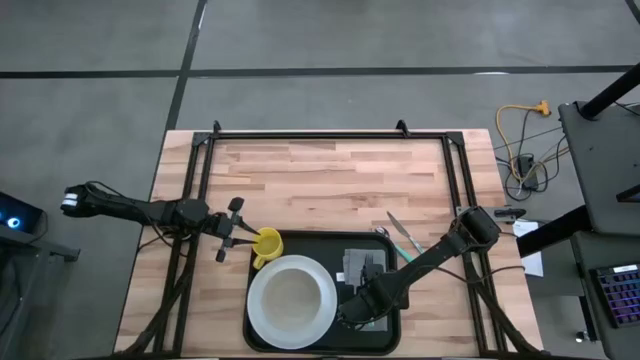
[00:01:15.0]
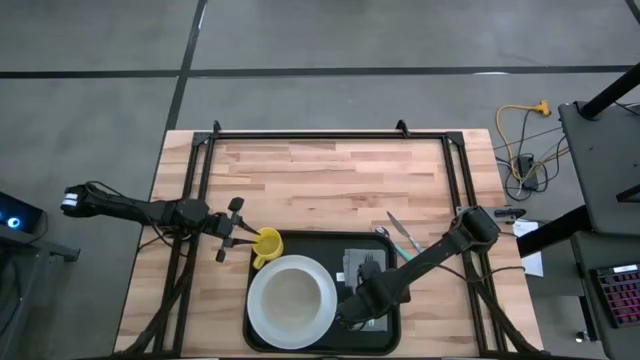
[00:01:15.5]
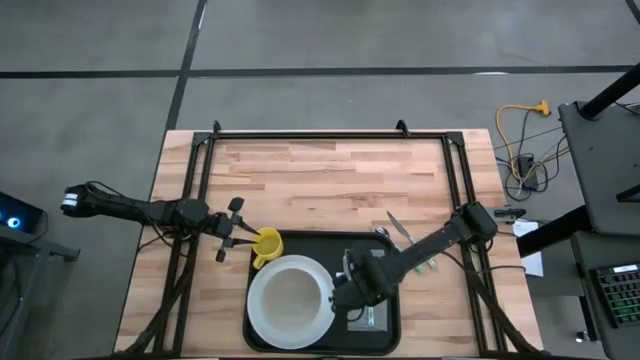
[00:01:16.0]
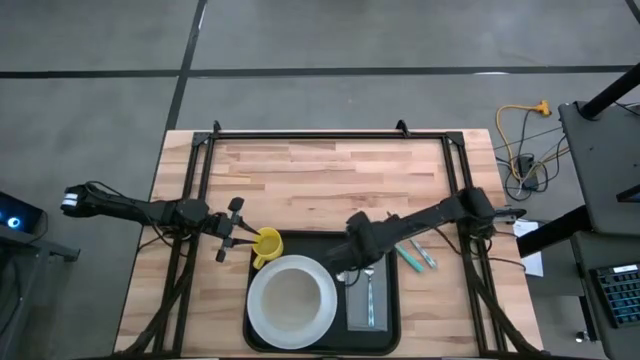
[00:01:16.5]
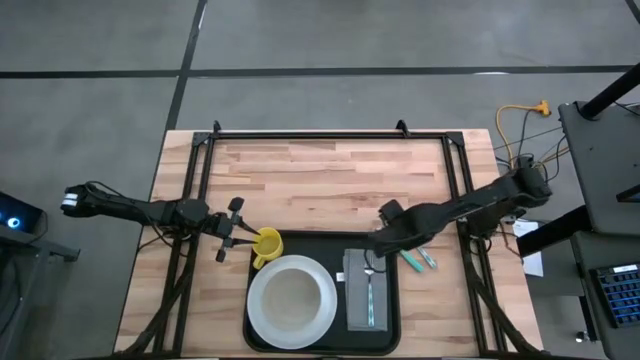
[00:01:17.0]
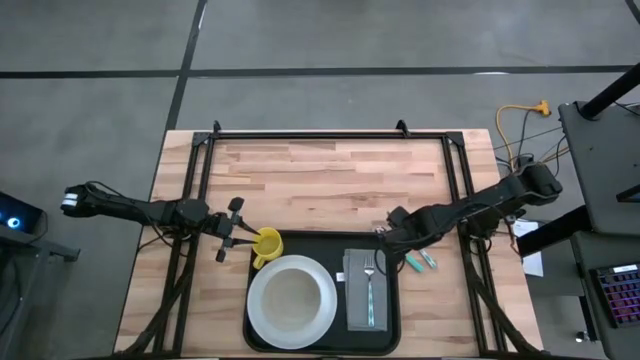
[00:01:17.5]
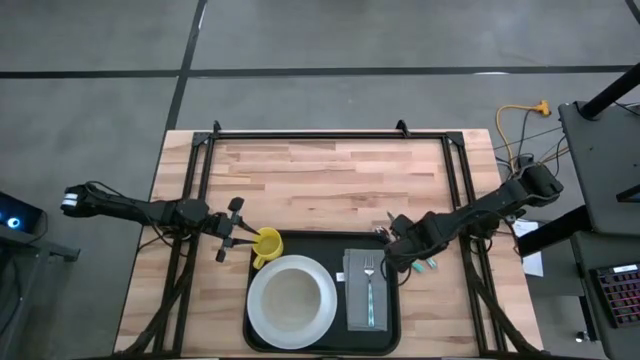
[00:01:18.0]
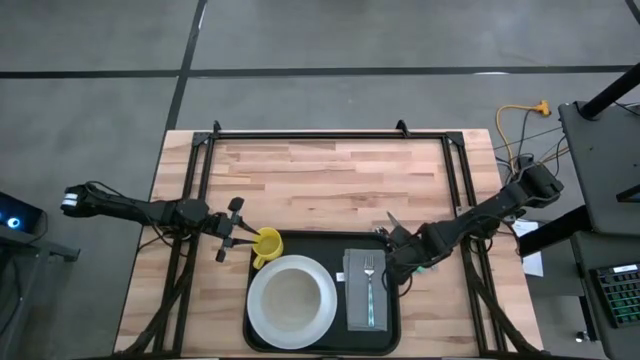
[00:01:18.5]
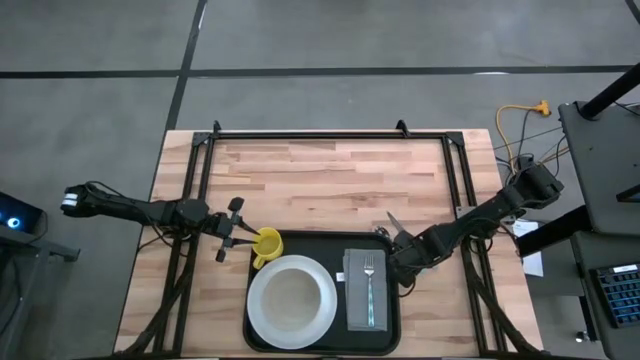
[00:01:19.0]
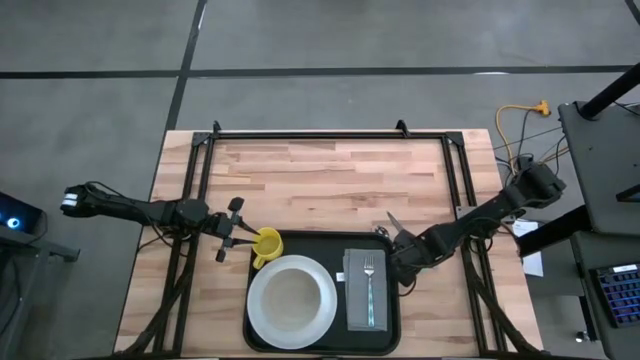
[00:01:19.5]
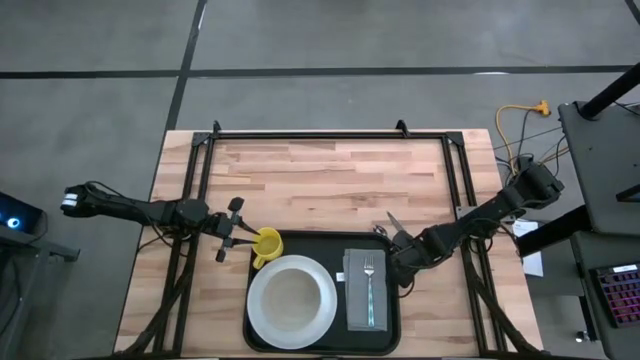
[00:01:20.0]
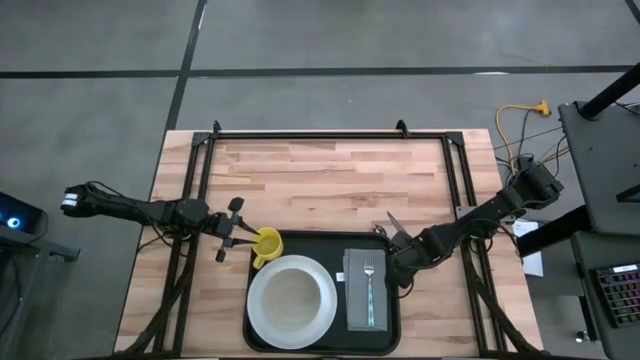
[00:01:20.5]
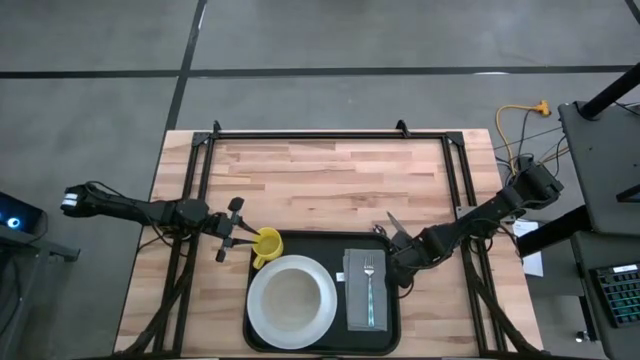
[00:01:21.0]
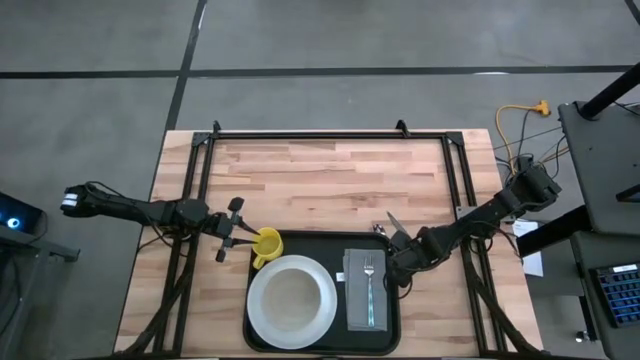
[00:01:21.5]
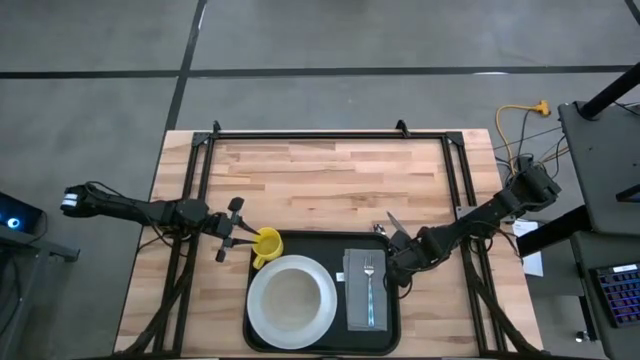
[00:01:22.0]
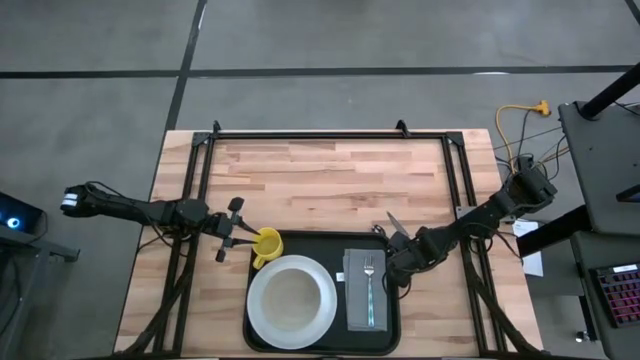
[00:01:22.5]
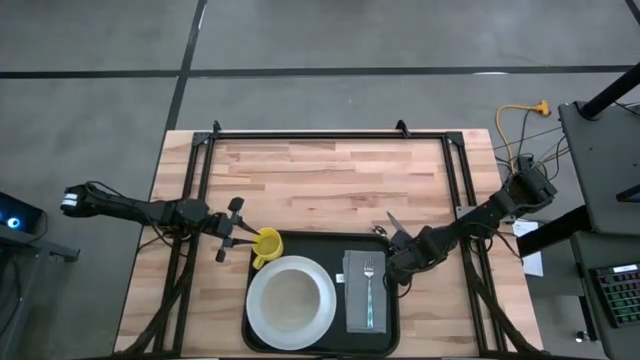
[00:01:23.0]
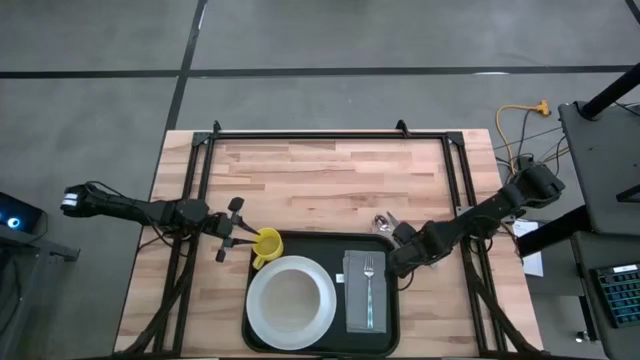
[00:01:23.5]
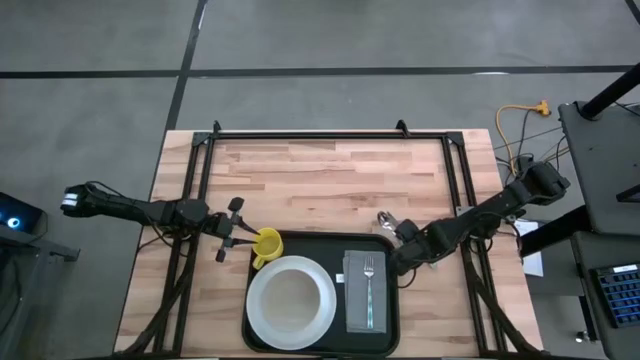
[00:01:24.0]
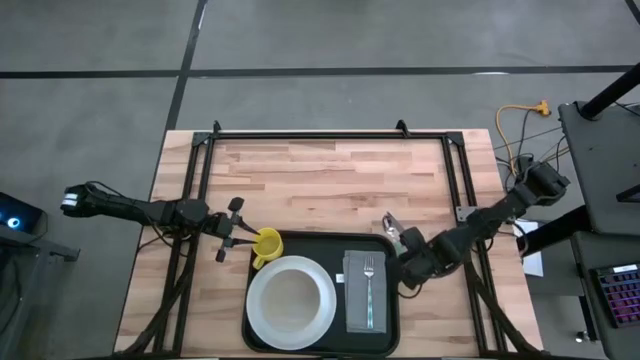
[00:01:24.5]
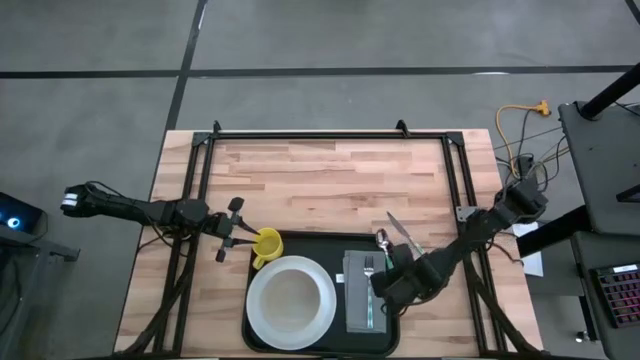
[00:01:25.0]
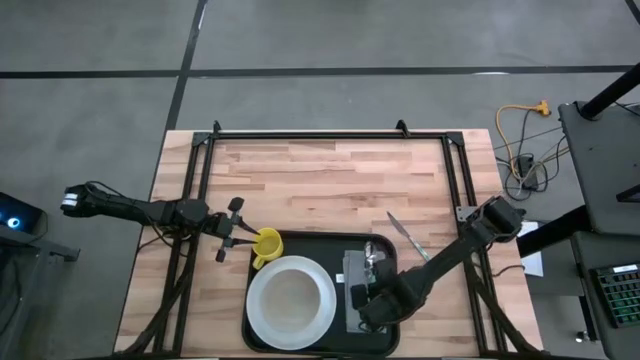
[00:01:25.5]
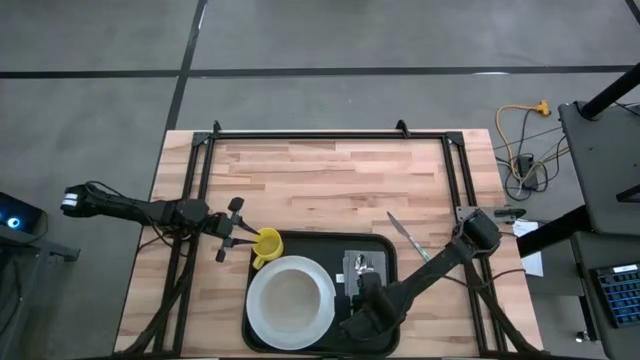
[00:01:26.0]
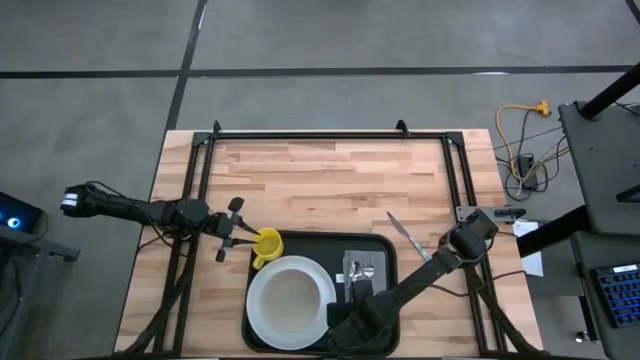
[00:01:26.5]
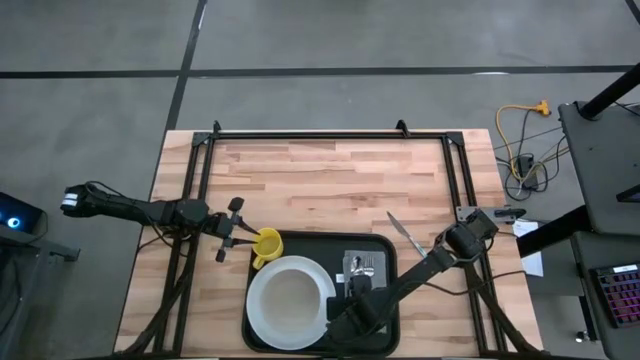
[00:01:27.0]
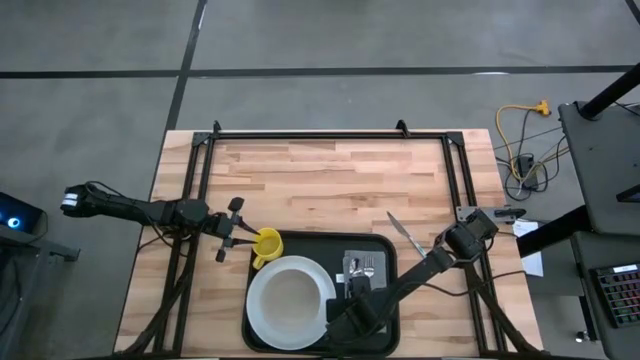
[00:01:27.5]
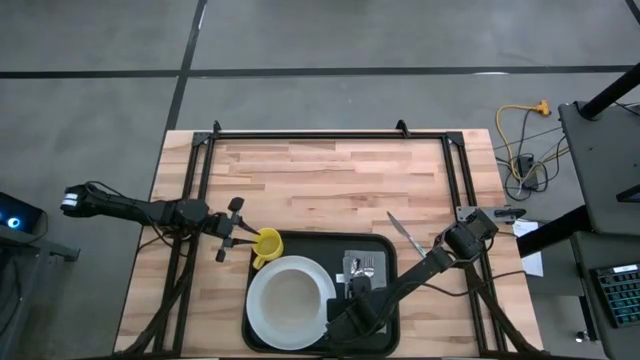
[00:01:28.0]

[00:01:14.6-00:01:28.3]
Task: Set up tray
Put the blue spoon on the gray napkin to the right of the white plate

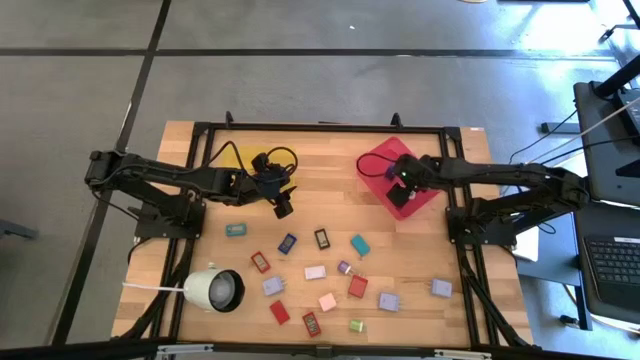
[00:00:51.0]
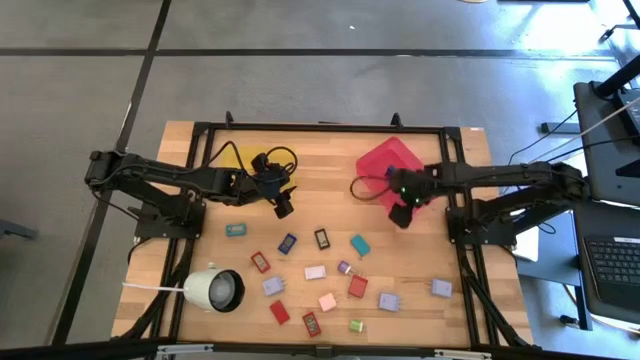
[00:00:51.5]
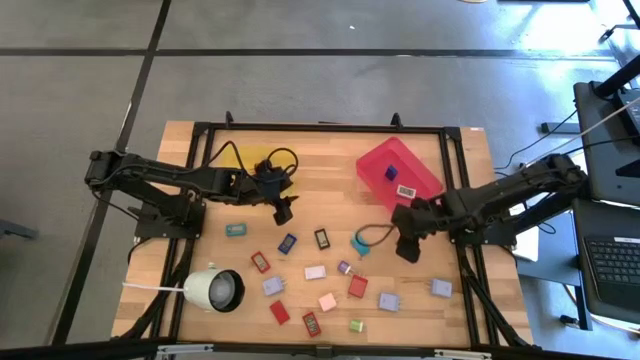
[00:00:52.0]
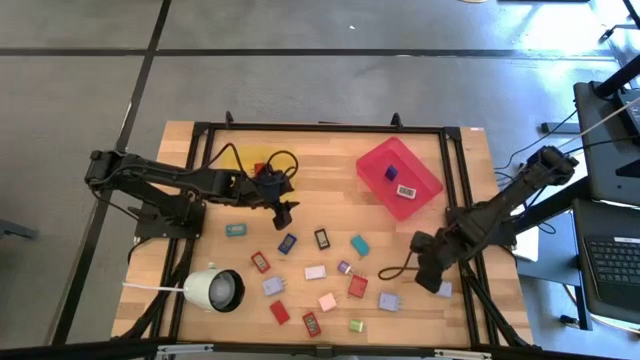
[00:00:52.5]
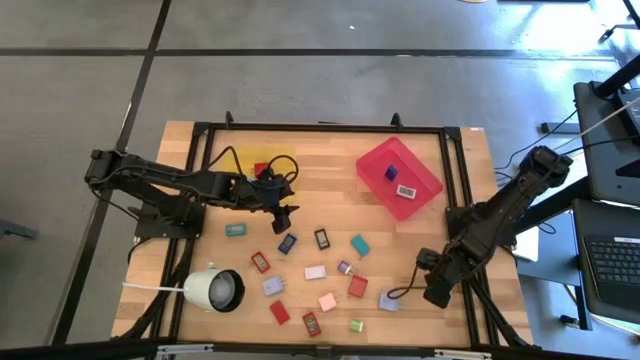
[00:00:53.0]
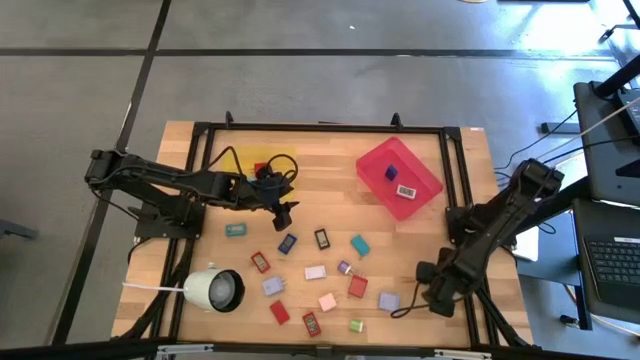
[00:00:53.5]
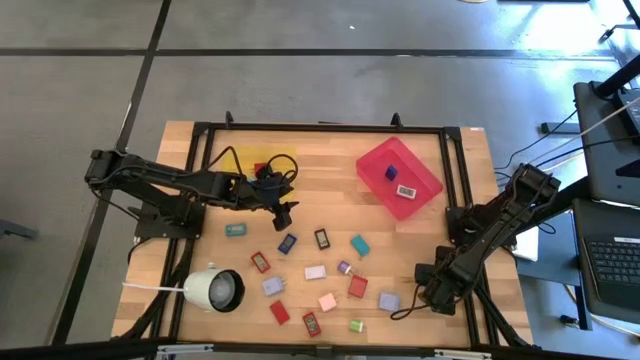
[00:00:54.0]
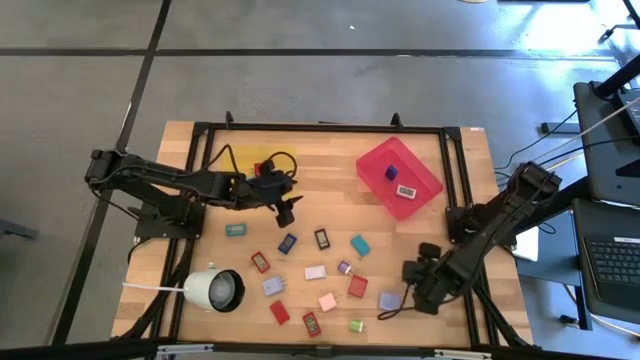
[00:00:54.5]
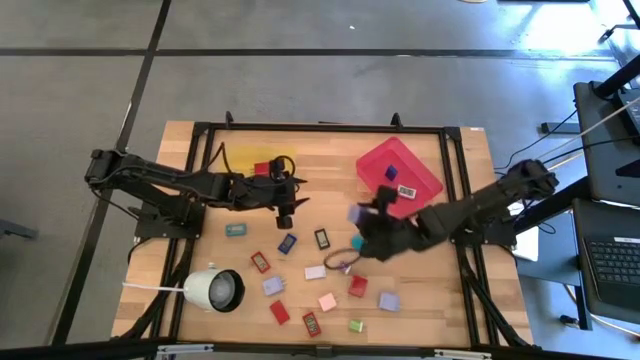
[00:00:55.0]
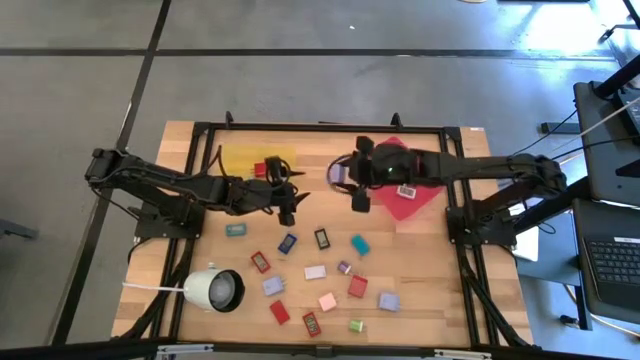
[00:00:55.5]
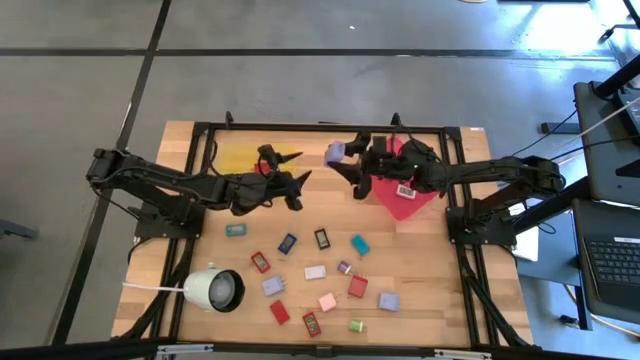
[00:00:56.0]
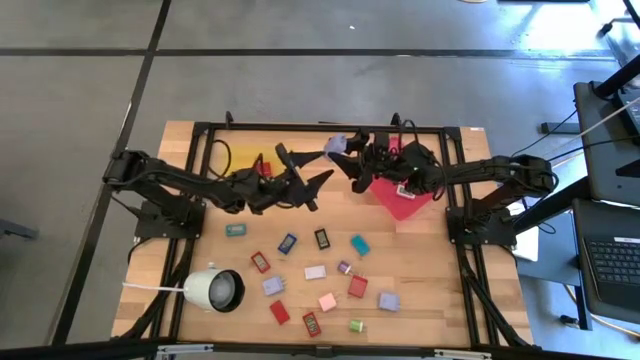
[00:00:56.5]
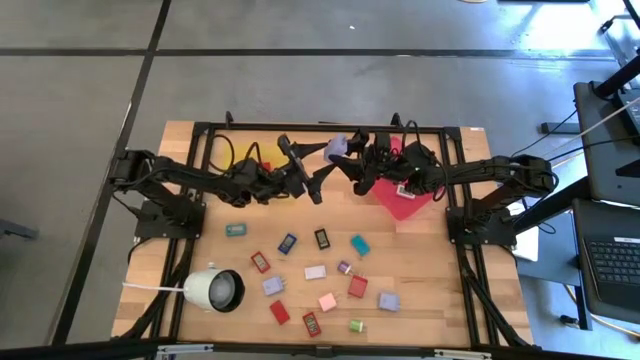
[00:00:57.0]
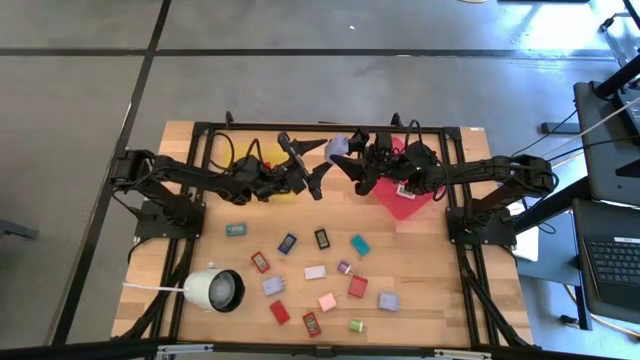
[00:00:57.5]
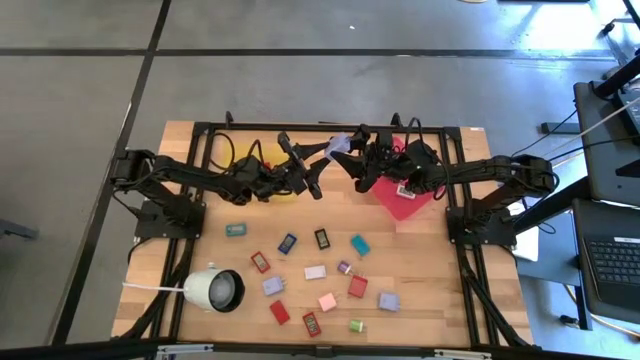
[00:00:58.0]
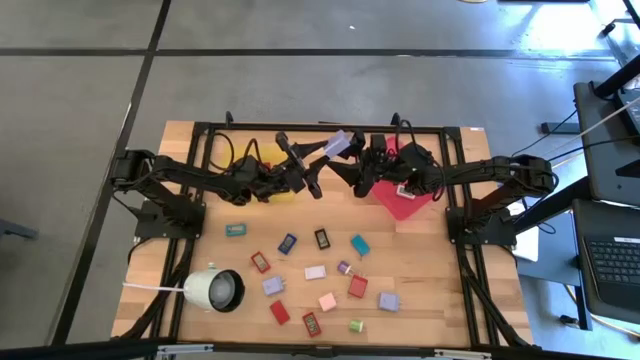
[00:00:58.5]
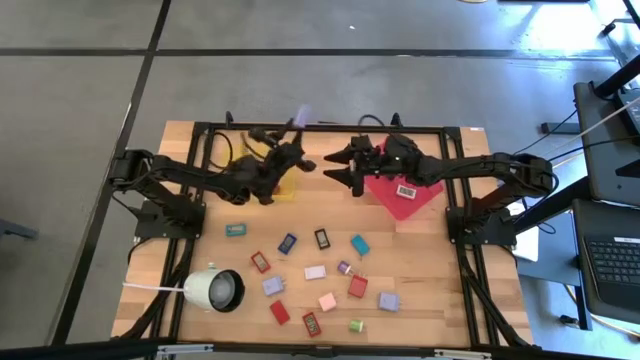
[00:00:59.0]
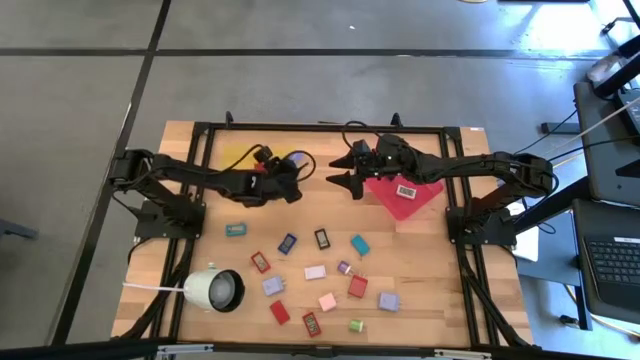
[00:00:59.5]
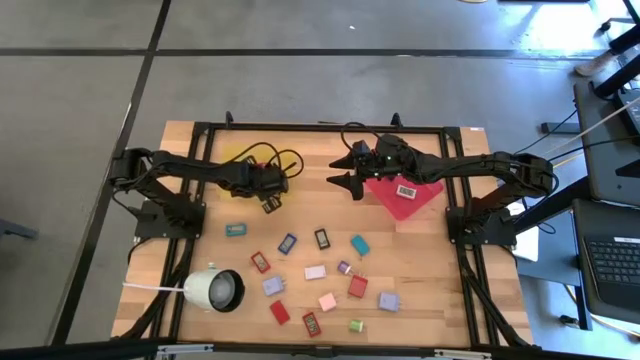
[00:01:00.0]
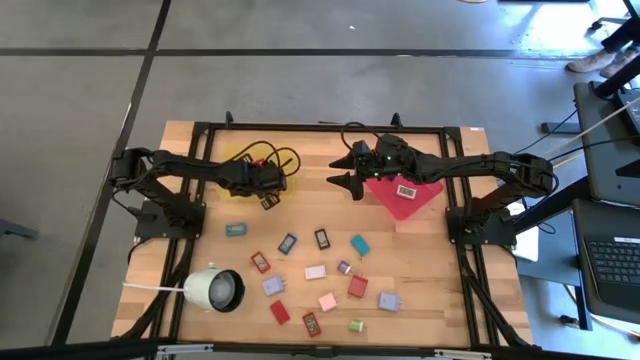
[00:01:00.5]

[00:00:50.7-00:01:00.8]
Task: Pick & Place Office items
Put the right light purple charger adapter into the yellow bin
